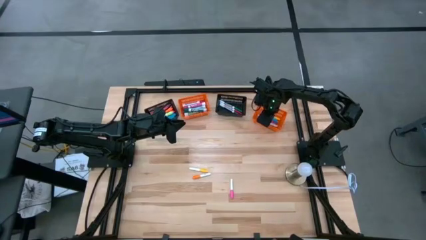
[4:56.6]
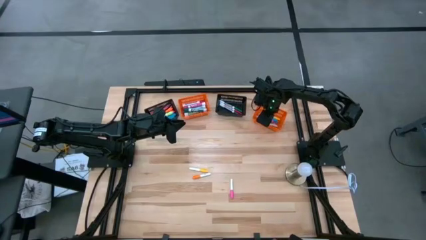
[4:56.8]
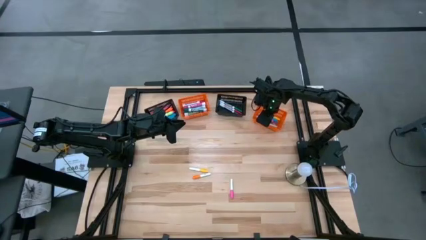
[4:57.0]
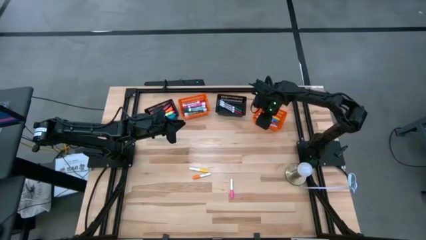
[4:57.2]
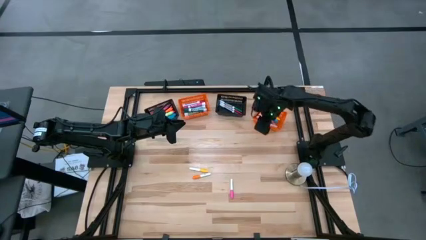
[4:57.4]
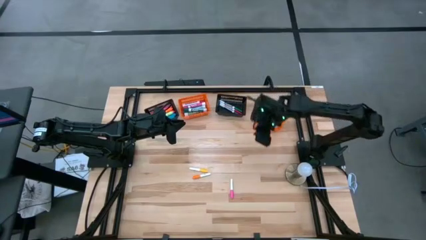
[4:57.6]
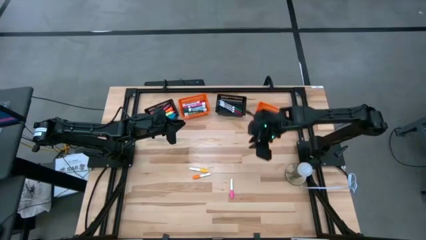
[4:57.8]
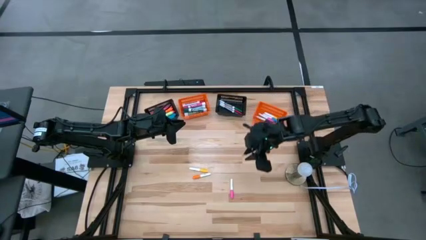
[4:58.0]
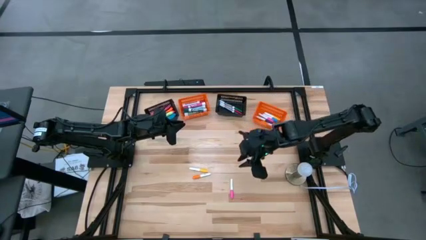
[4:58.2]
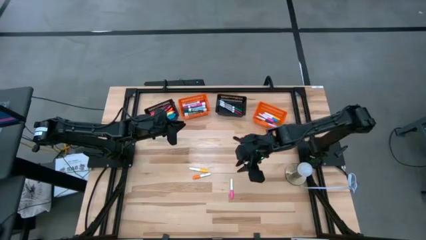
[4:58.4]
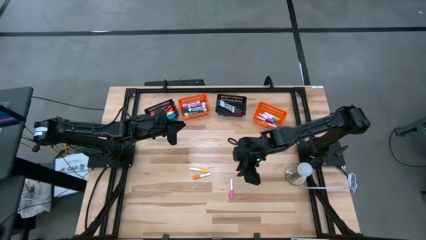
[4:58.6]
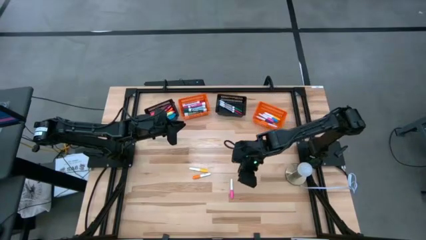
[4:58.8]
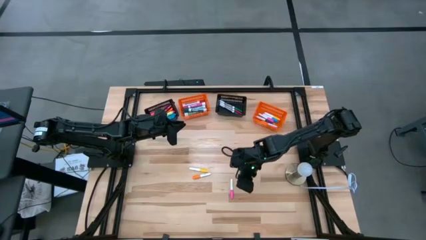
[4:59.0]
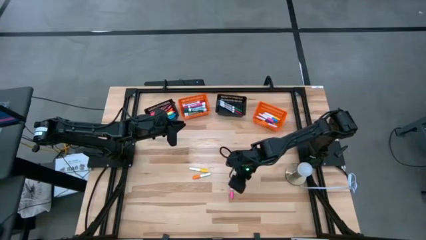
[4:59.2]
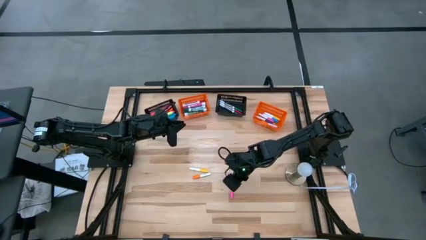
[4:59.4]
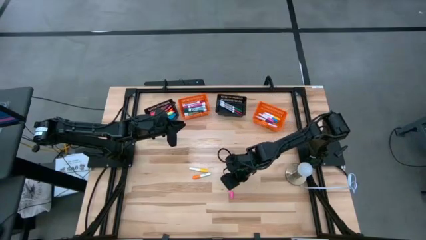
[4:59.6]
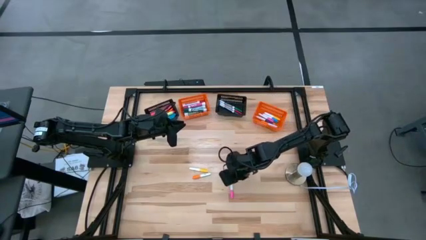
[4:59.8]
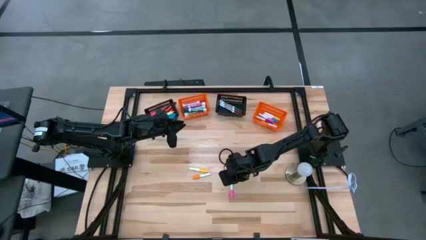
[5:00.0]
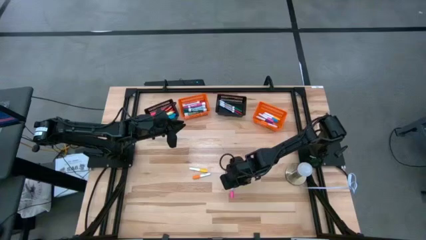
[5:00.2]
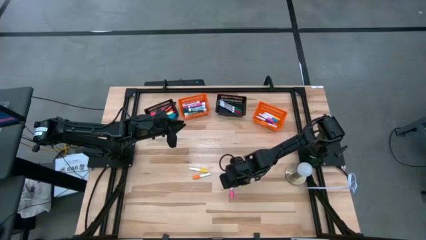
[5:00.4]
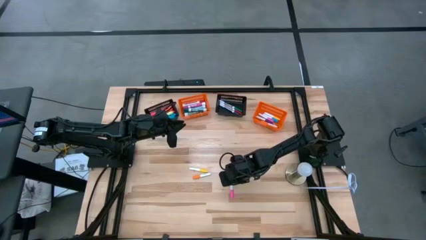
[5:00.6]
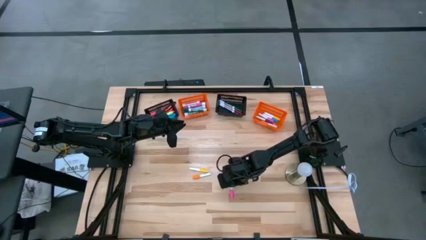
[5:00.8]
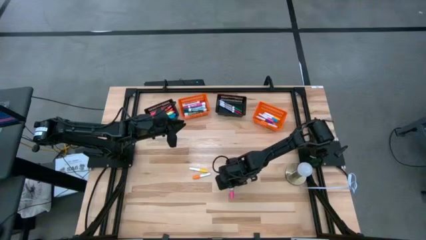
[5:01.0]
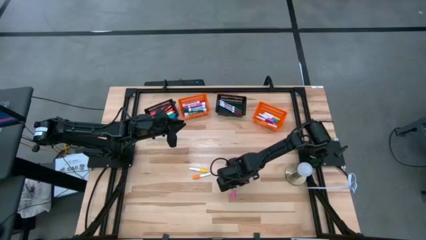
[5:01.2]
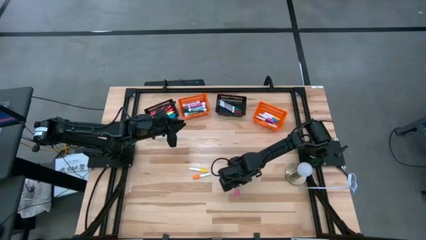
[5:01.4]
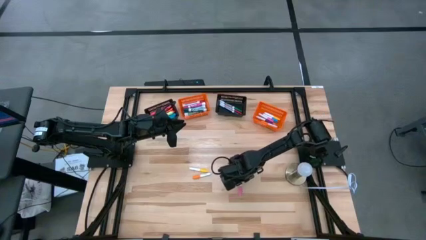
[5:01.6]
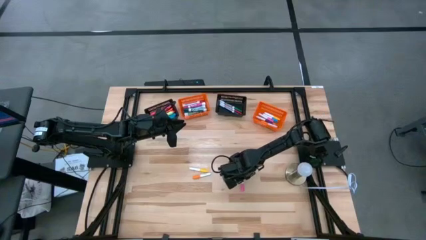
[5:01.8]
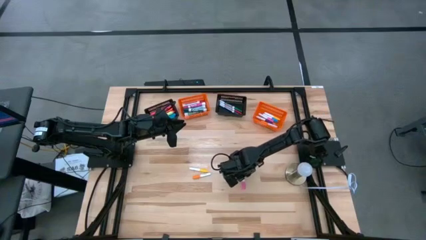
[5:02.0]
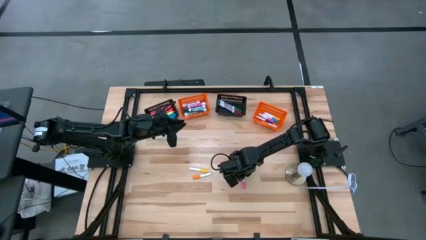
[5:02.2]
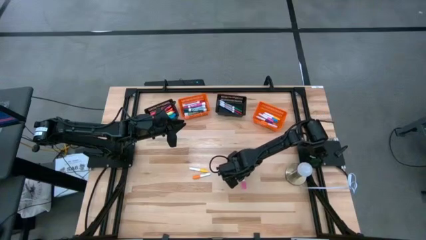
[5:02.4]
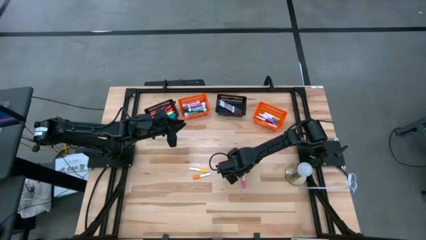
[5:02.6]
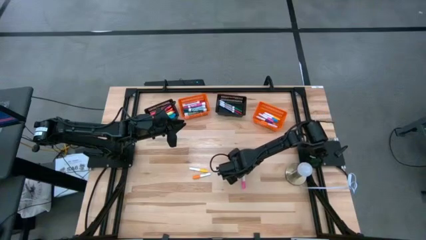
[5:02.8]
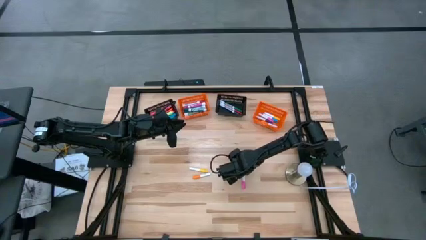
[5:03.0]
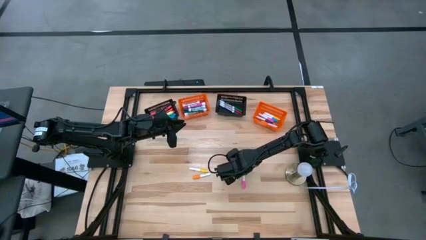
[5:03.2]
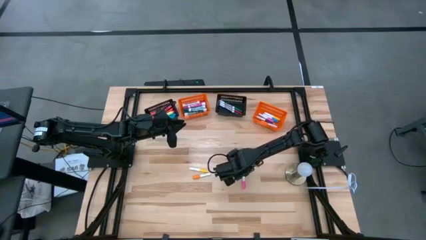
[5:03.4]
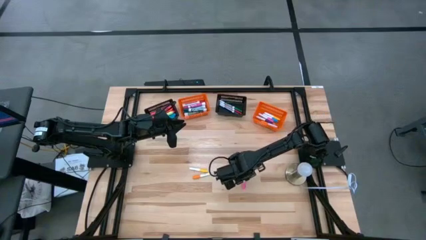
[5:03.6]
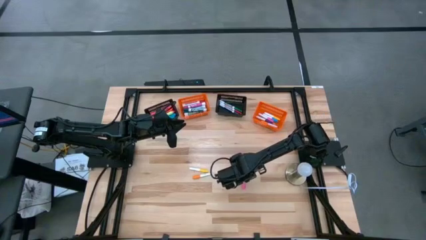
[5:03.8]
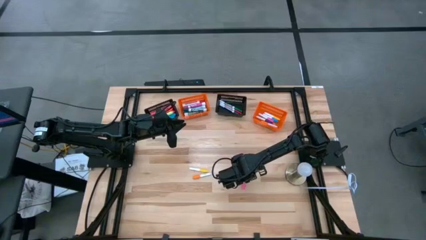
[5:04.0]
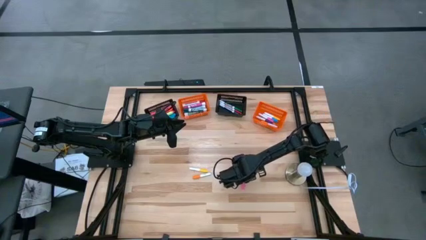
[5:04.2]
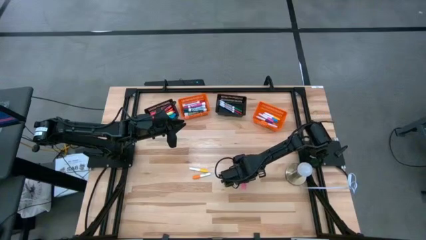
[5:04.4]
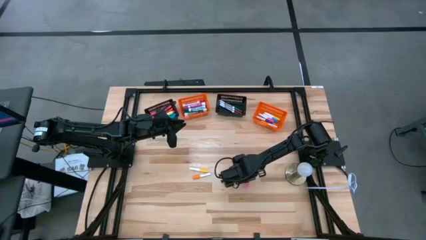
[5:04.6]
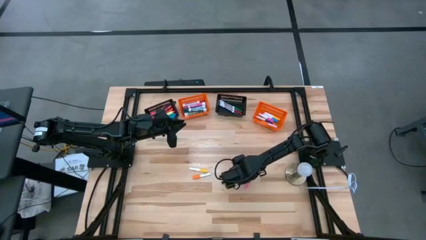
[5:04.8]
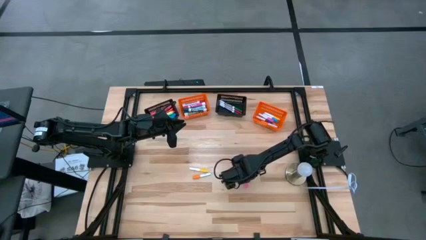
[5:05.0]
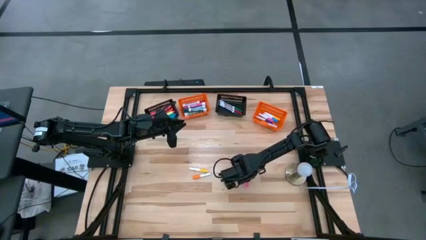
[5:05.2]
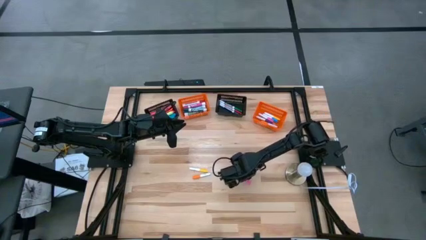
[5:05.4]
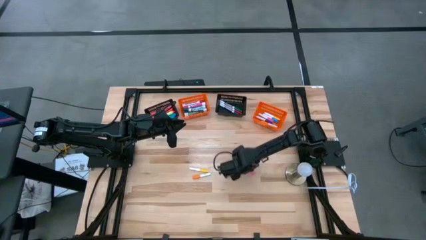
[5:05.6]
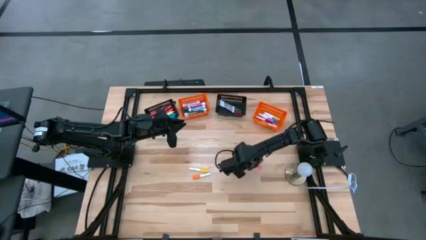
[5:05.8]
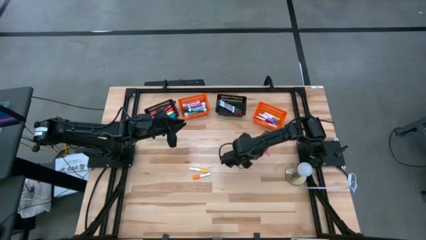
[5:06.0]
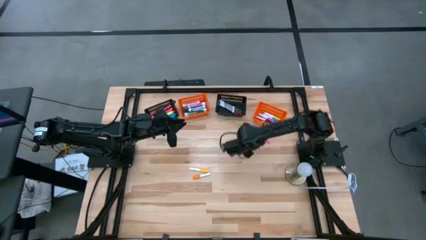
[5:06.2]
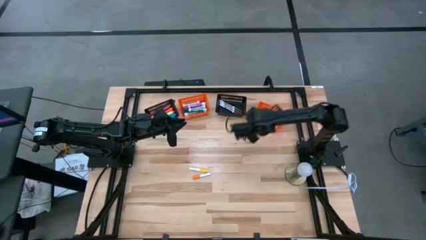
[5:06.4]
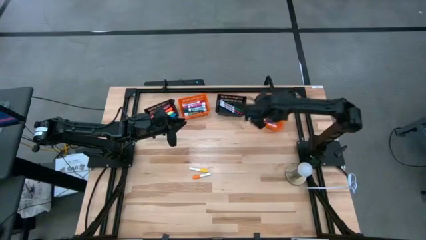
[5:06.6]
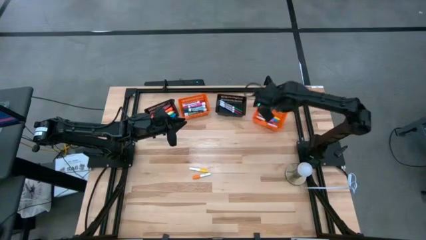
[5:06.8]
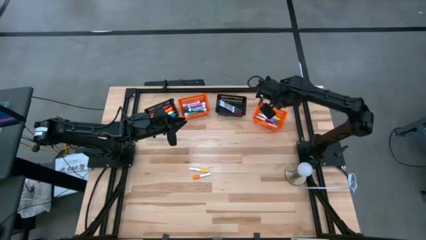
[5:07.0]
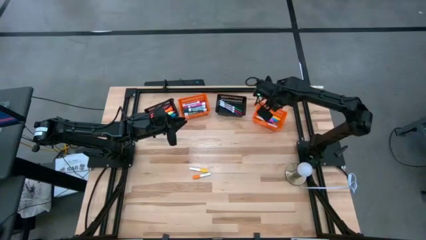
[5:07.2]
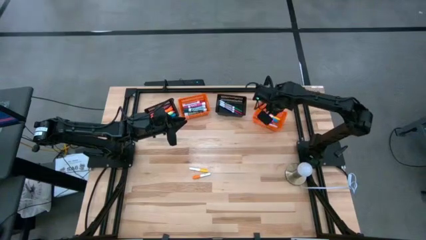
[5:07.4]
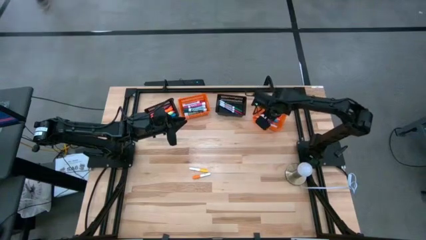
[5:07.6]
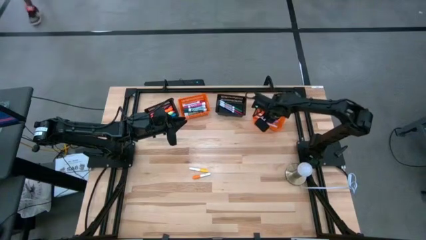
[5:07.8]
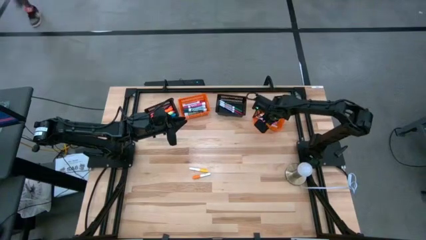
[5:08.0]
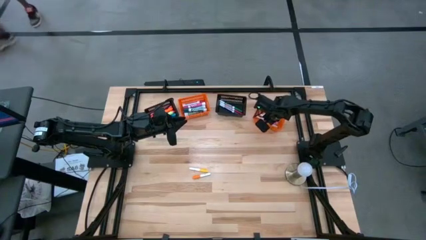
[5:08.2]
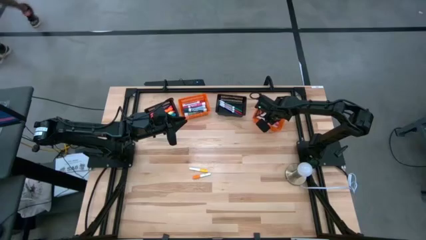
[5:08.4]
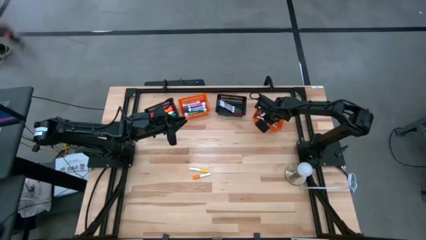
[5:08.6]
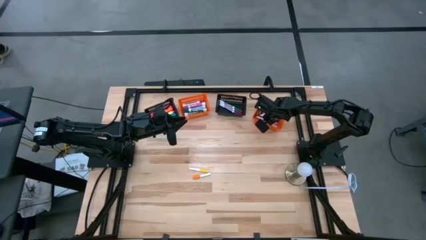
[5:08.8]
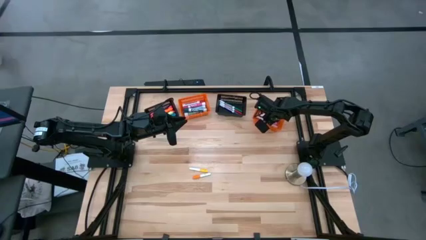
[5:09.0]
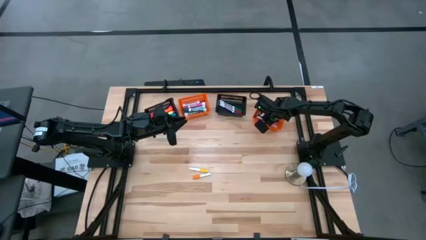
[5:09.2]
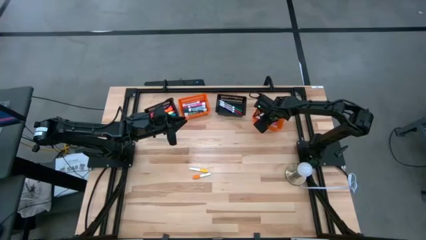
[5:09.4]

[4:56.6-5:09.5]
Task: Pick & Place Markers
Put the pink small highlighter pen into the left orange bin

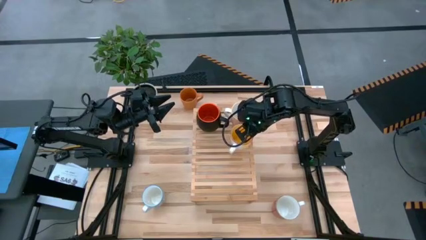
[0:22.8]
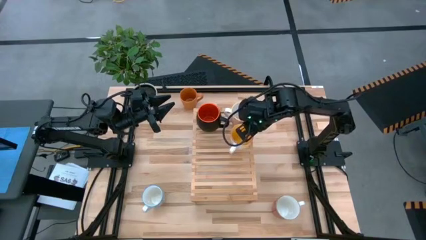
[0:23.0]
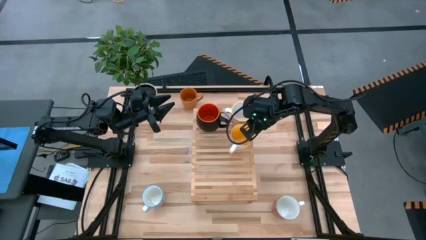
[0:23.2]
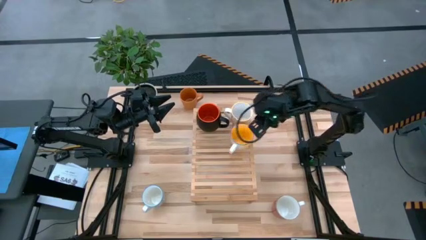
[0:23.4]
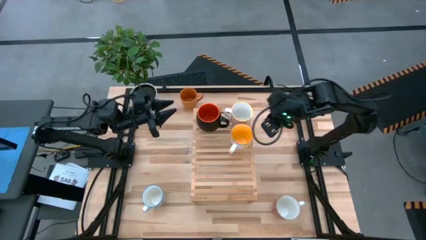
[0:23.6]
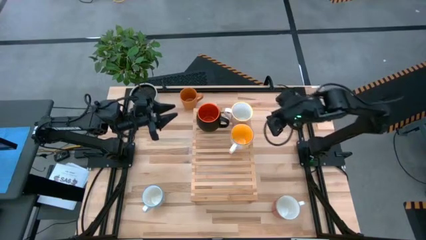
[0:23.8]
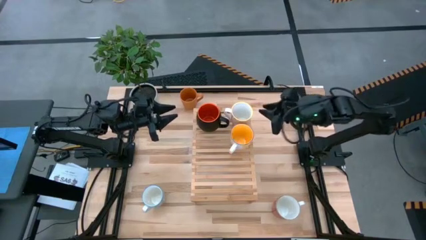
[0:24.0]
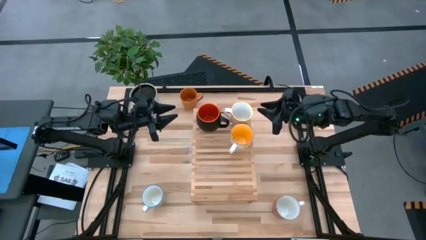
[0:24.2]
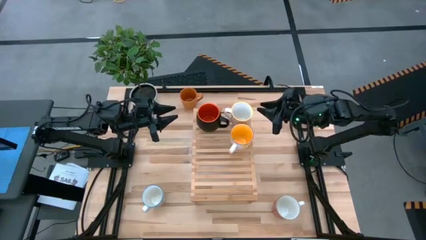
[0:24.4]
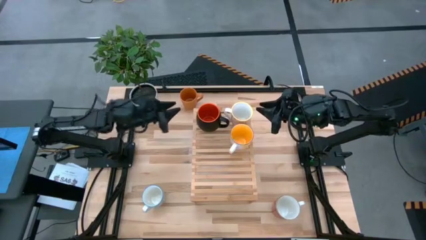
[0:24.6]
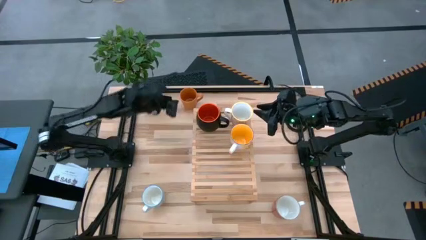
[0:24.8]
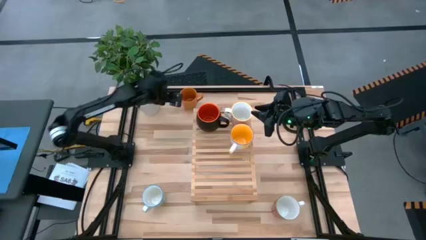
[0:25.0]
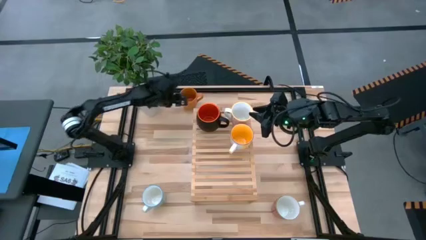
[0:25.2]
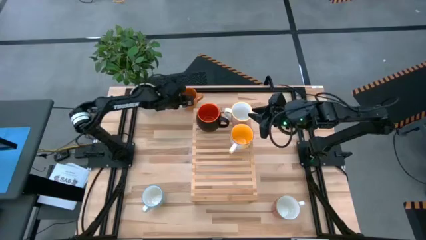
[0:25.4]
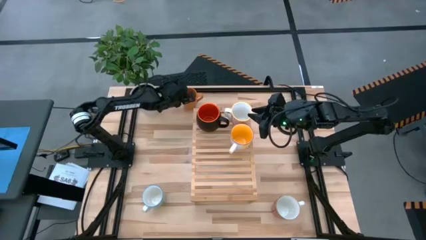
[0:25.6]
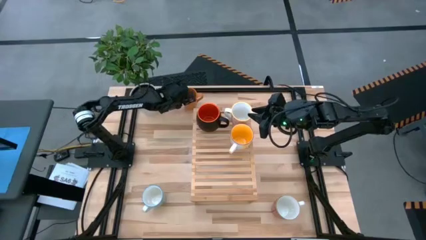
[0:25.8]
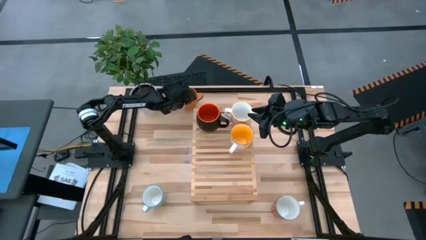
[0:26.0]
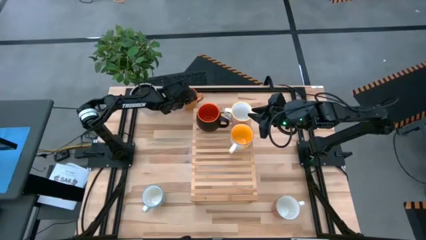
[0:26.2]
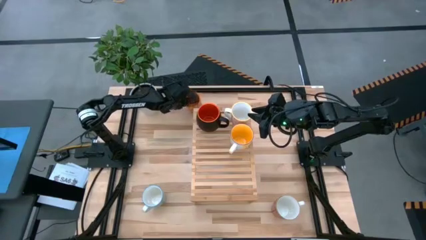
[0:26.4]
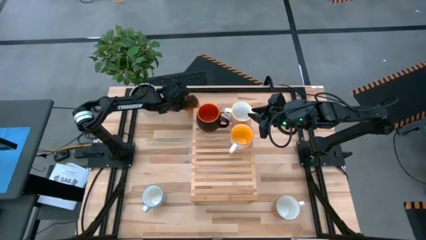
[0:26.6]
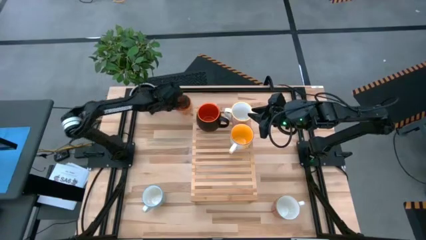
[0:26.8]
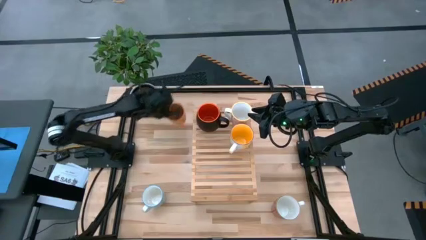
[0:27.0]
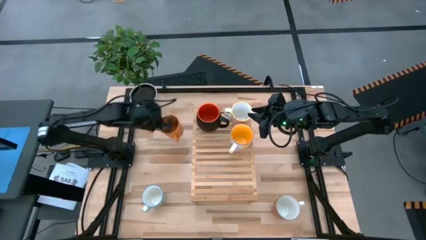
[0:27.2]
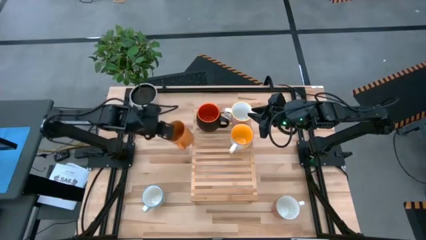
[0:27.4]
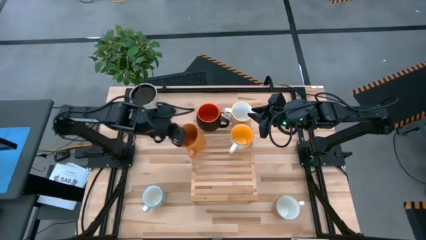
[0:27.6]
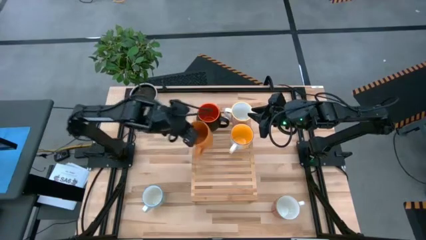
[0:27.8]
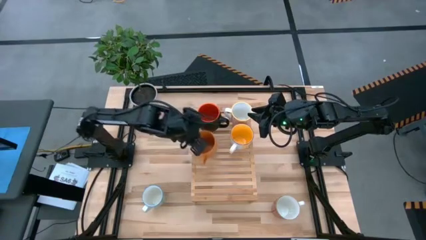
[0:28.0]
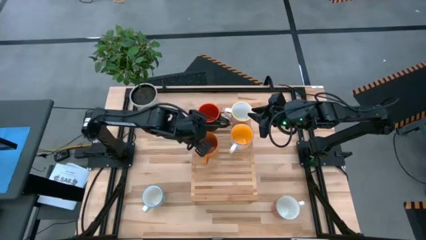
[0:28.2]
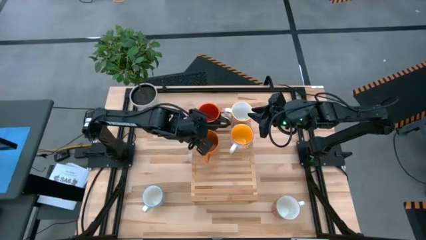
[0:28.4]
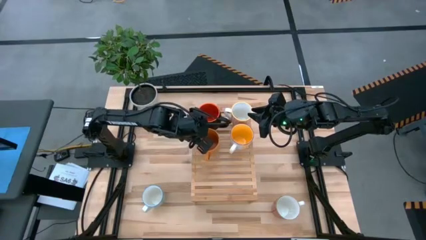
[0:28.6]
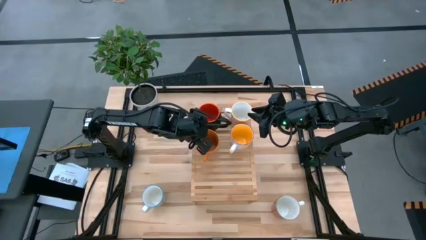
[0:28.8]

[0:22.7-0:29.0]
Task: Place coffee mugs
Put the orange mug on the shelf
